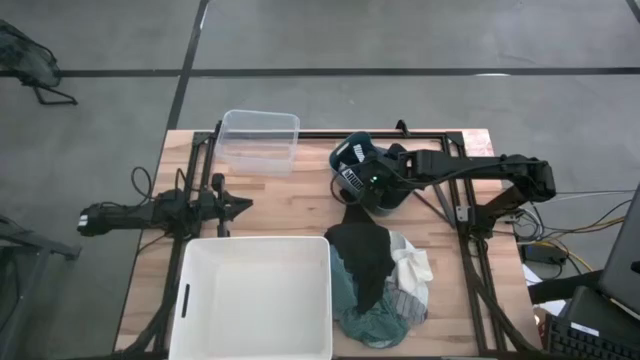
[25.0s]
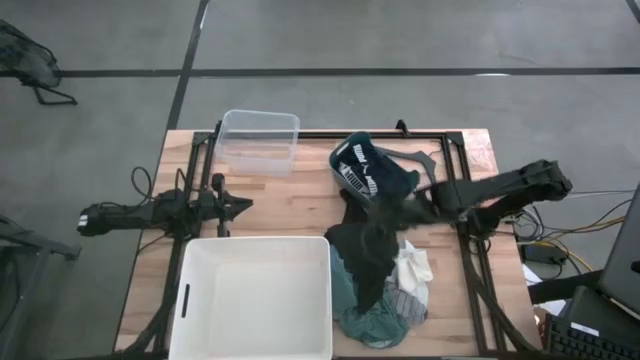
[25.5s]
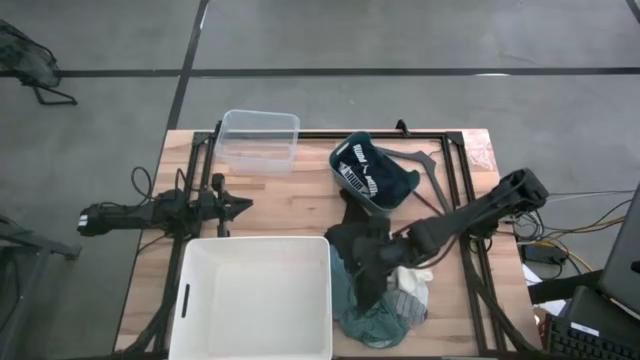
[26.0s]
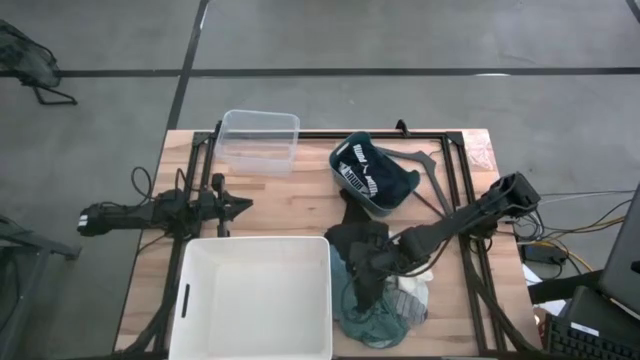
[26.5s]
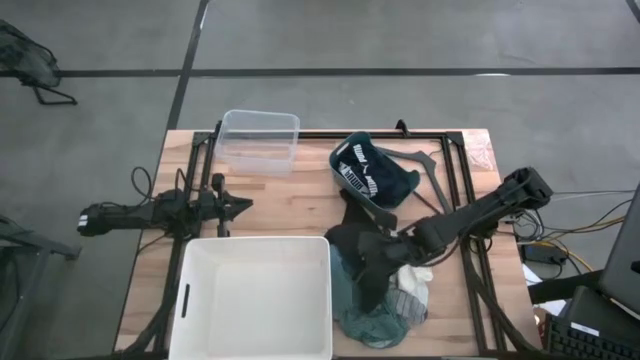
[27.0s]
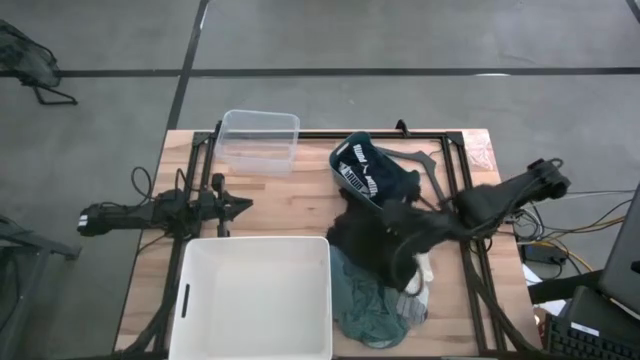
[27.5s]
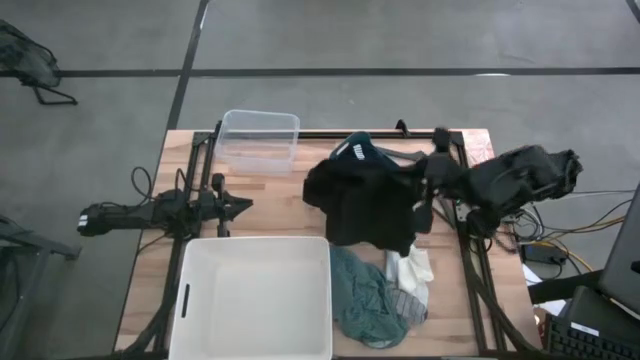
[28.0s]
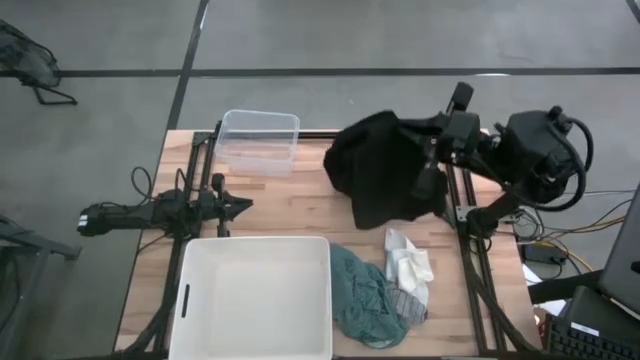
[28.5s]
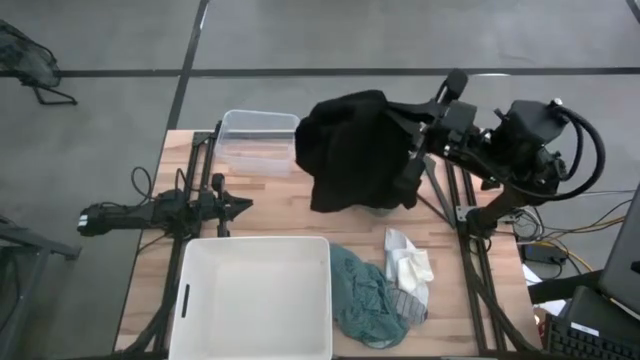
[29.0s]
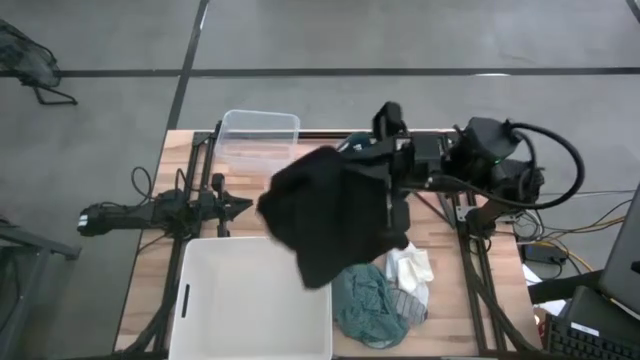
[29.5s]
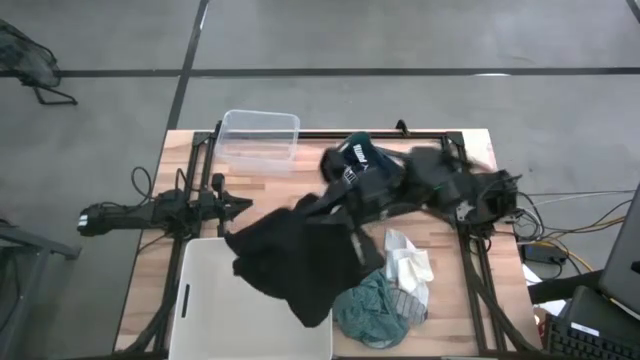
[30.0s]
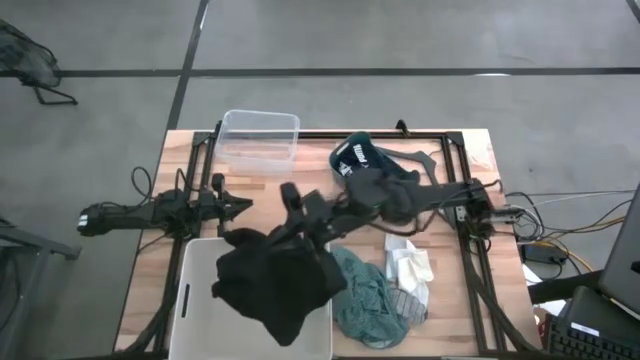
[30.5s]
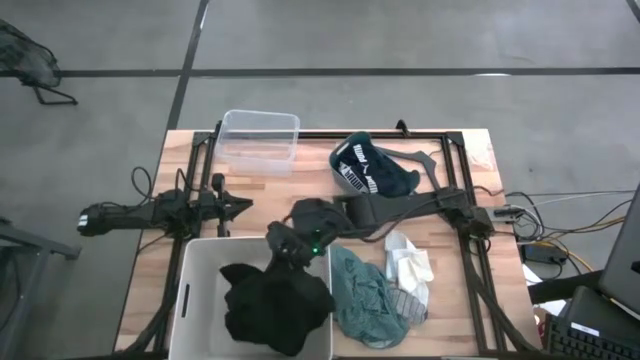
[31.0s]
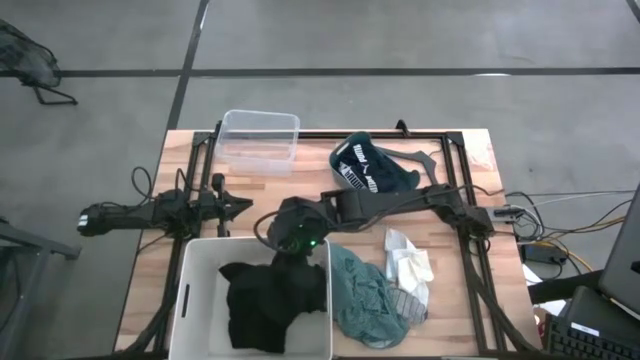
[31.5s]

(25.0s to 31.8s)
Task: Pick & Place Cloths
Put the black polo into the white bin

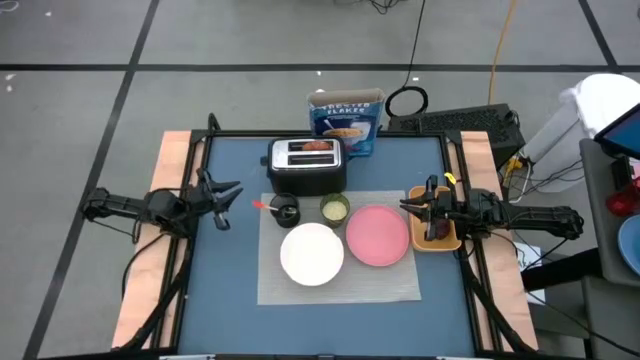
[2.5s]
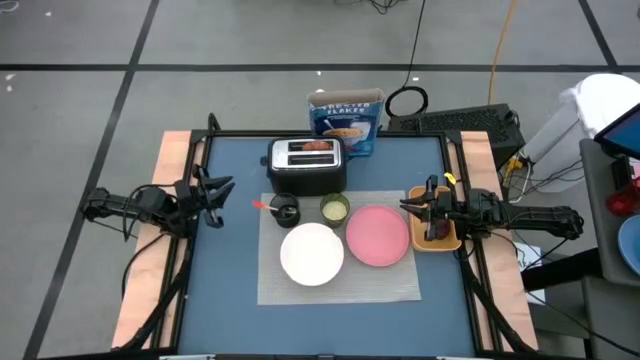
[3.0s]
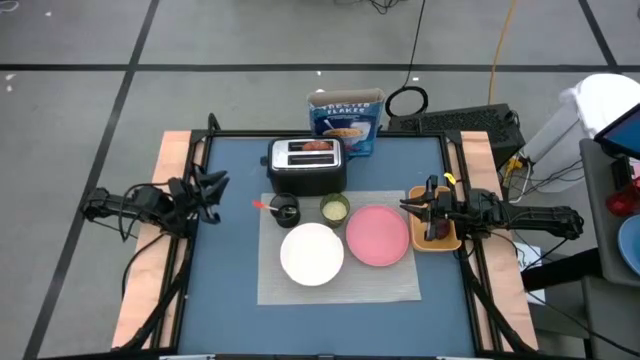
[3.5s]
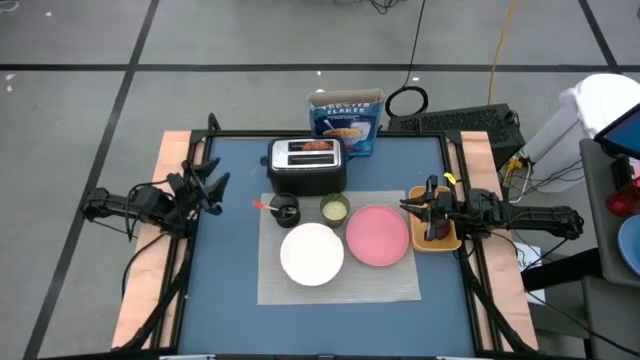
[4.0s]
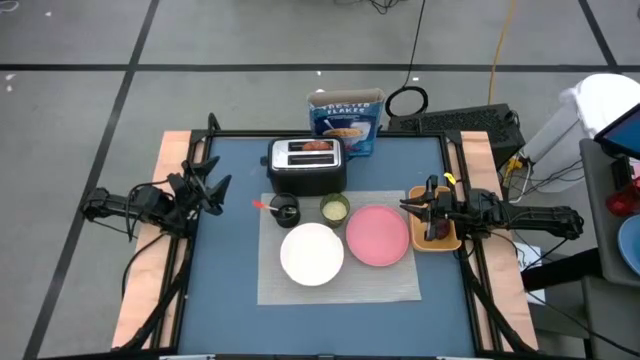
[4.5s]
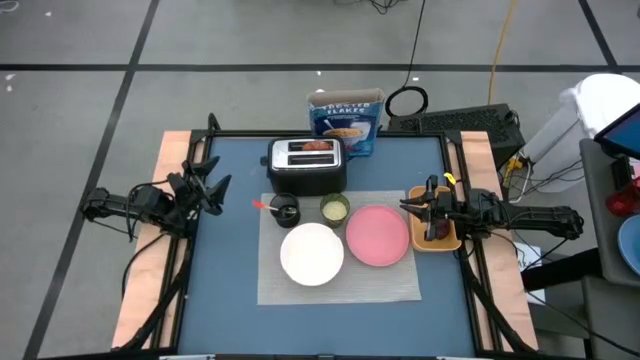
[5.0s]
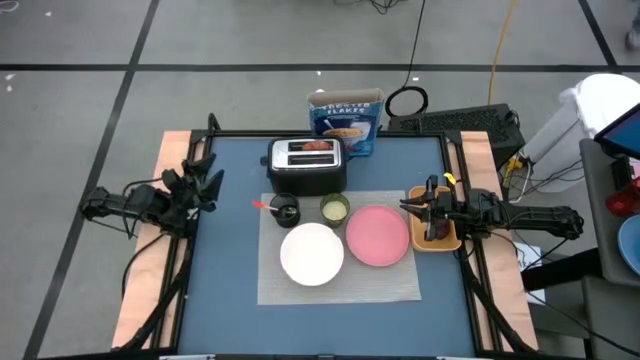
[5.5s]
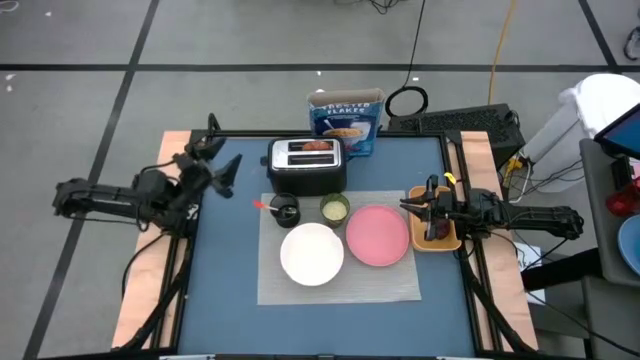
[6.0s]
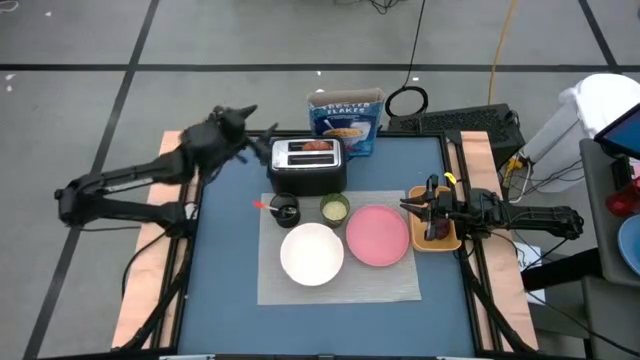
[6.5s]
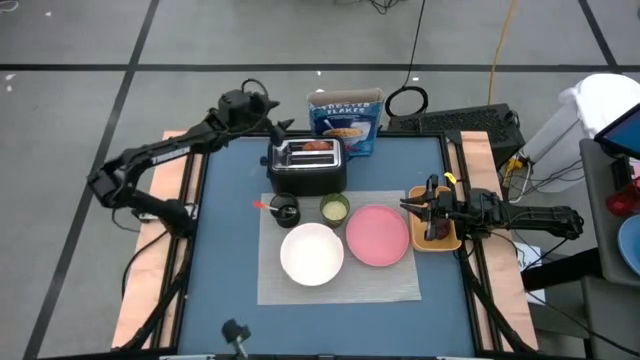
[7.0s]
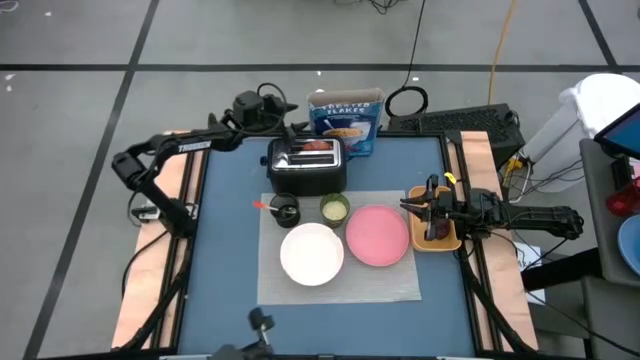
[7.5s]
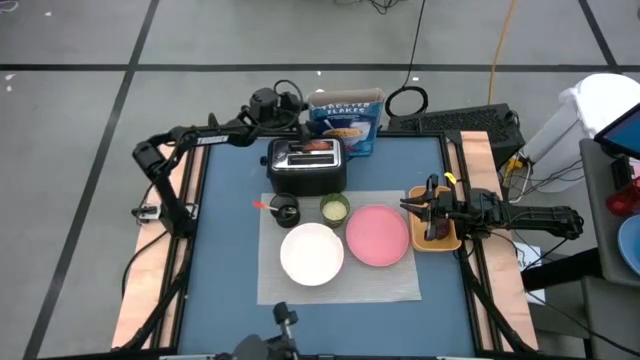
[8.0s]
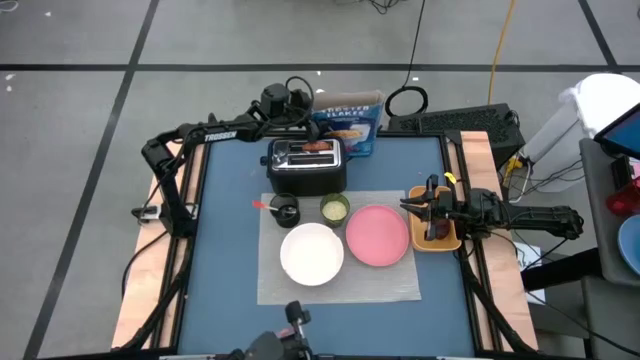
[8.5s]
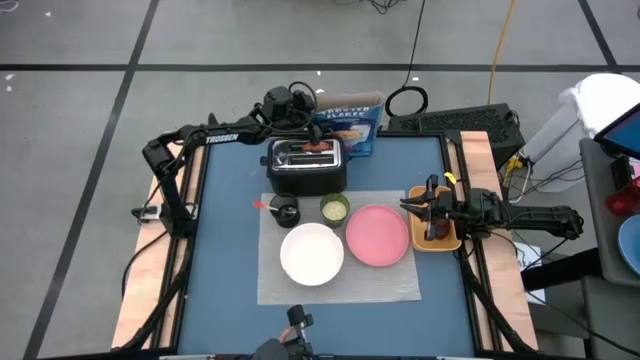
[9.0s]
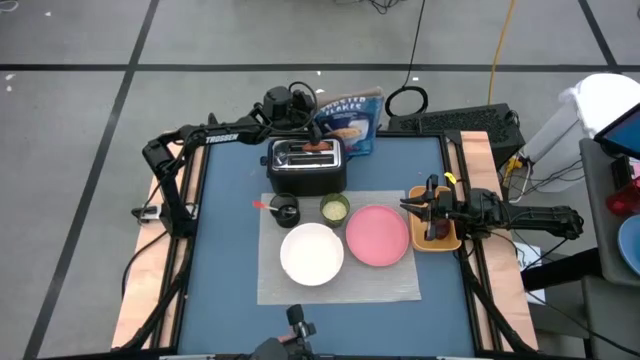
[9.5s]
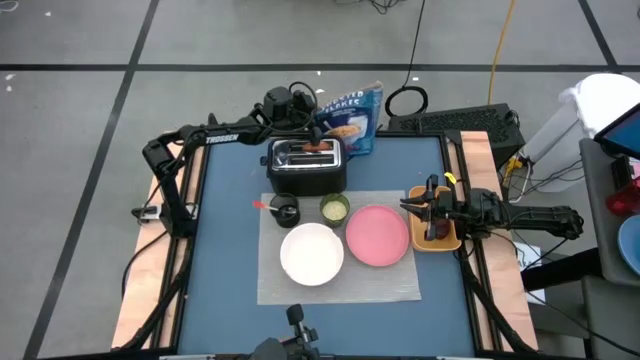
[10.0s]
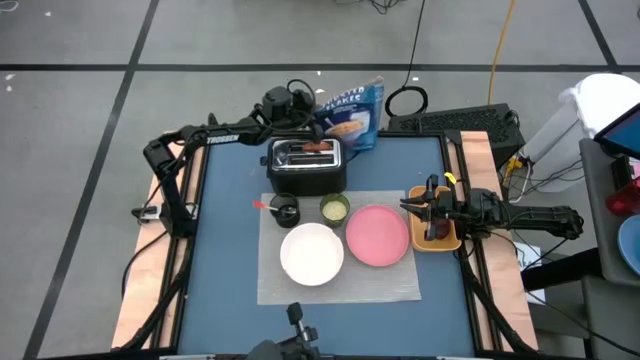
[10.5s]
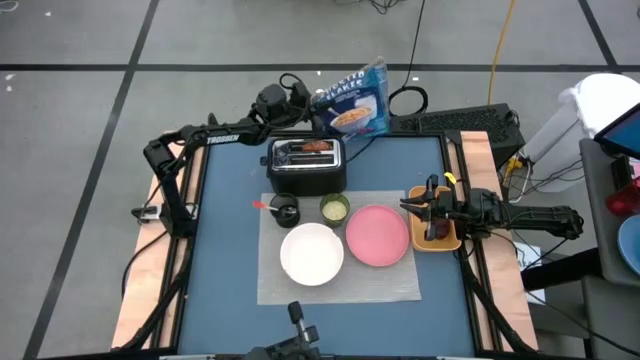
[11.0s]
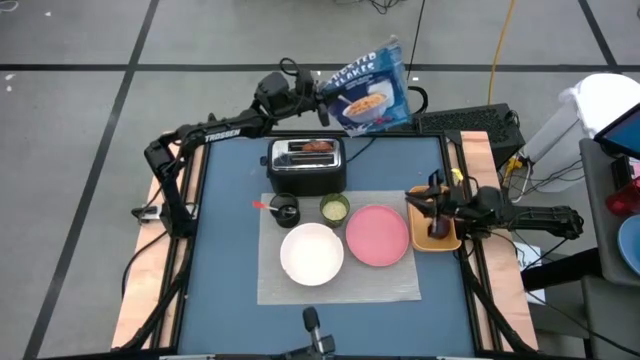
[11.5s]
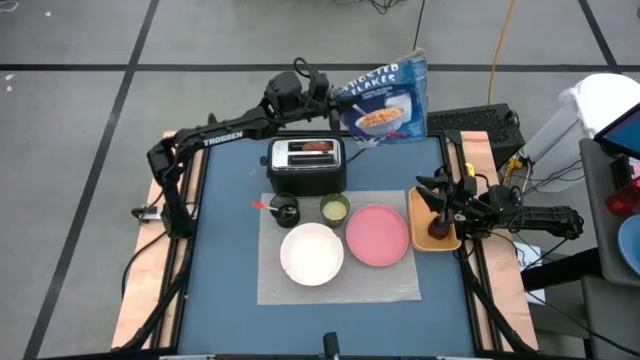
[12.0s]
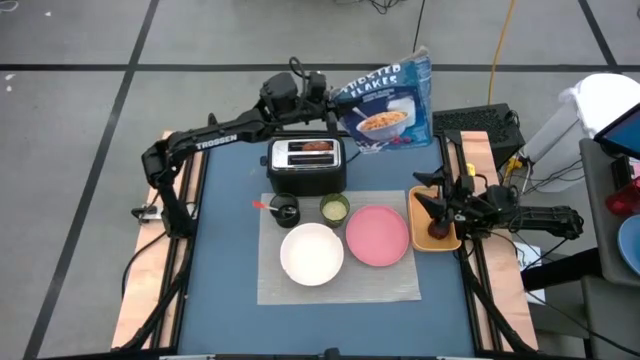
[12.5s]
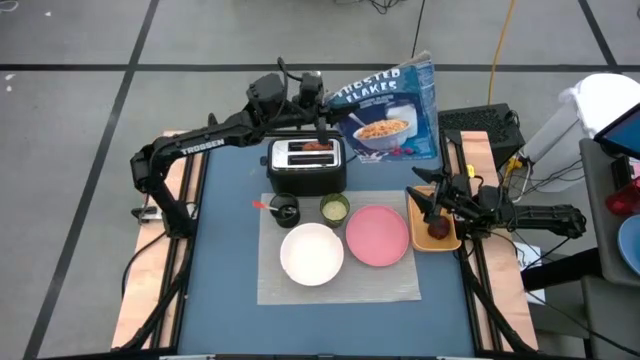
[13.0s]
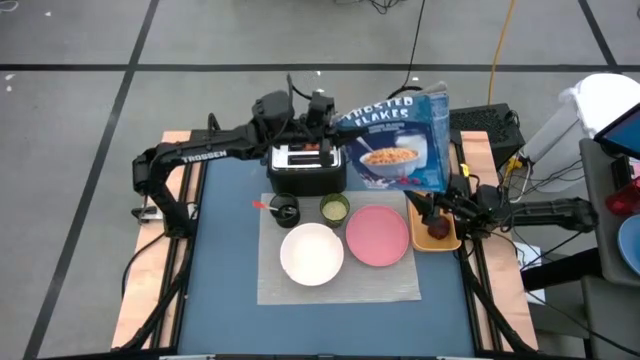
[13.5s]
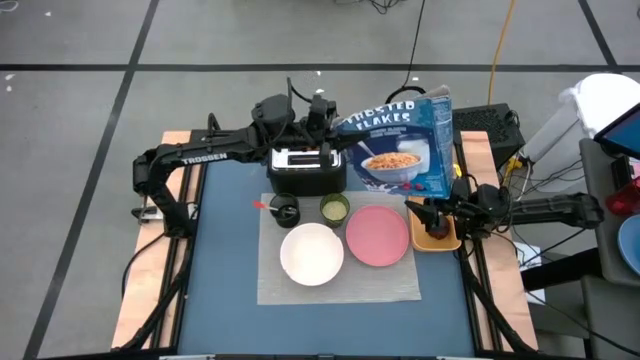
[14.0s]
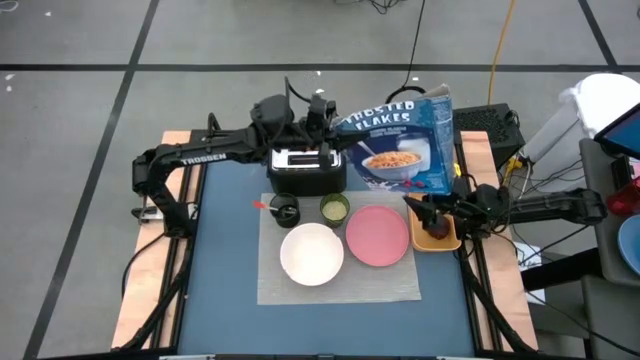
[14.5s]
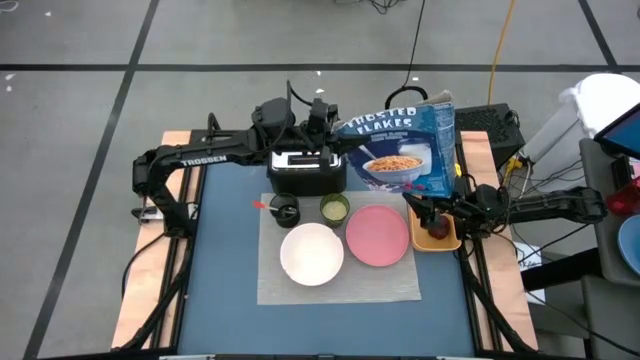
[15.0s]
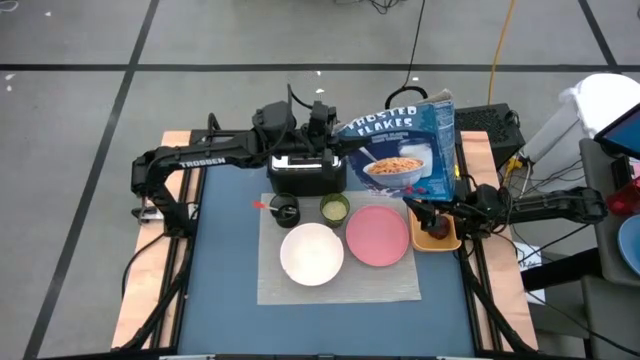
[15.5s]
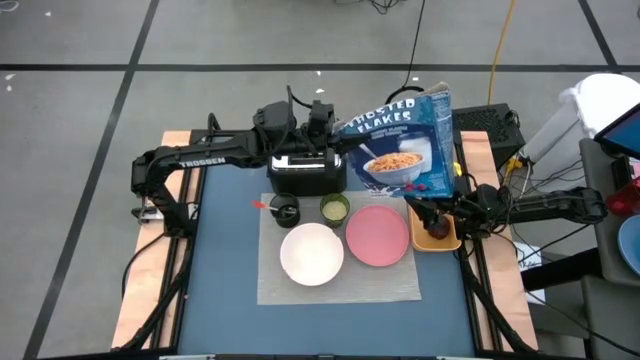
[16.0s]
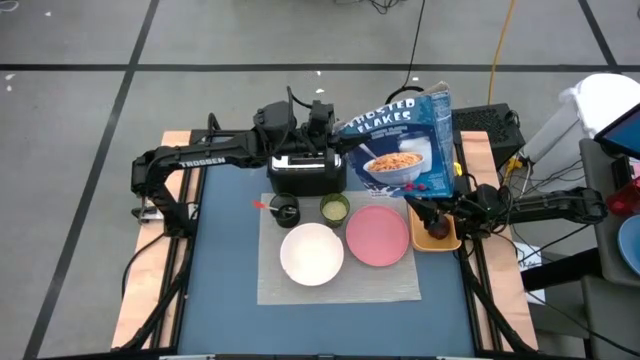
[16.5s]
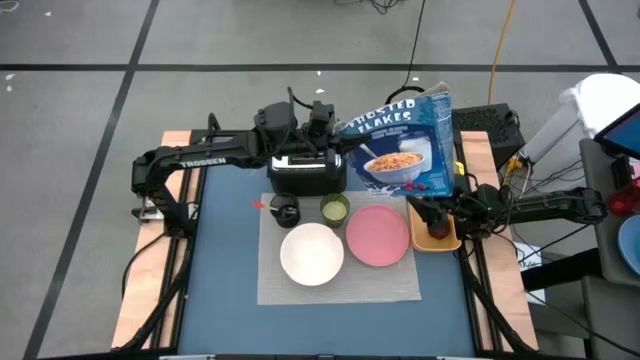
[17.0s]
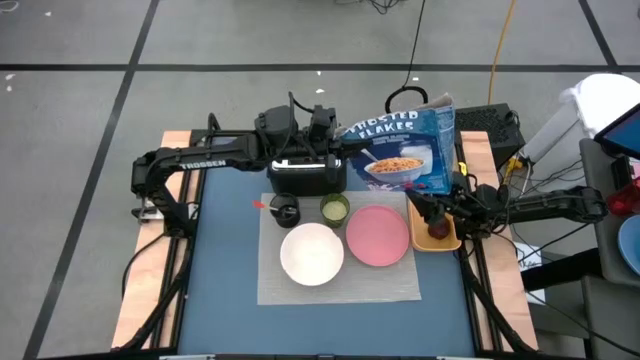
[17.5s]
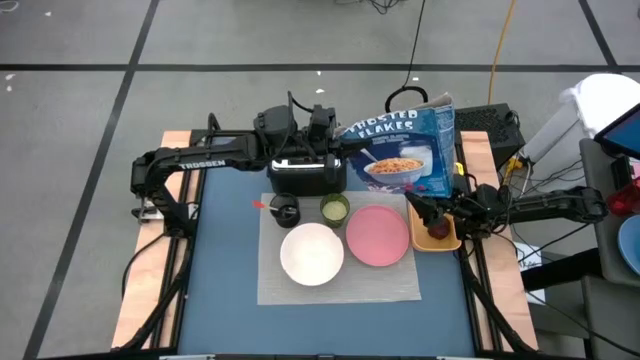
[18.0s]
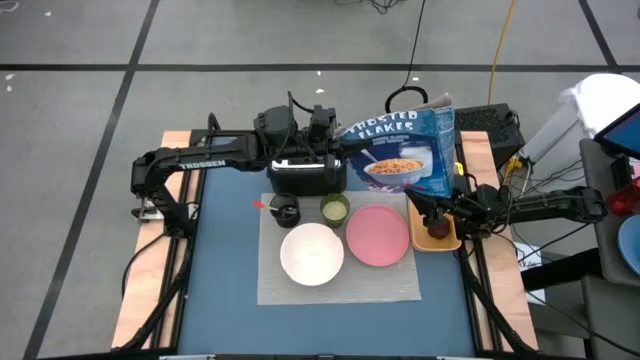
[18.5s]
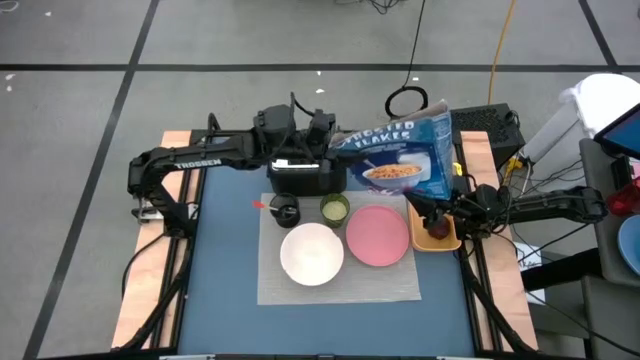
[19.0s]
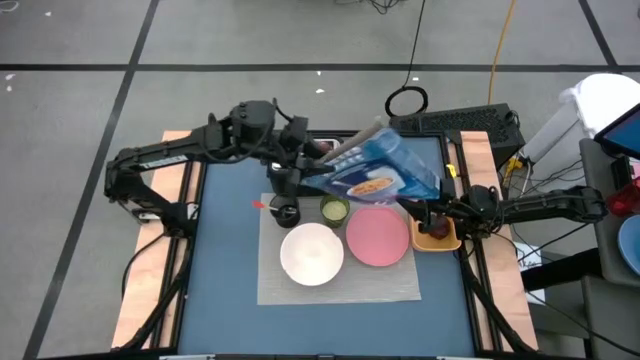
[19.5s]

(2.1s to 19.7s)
Task: Arrange a breakfast setting
Pour the cereal from the blue cereal box into the white bowl
